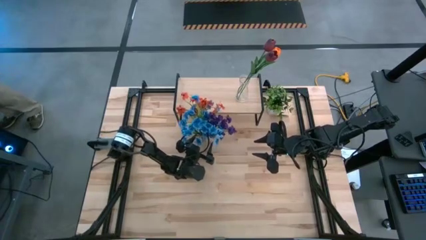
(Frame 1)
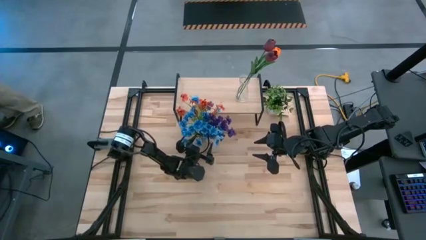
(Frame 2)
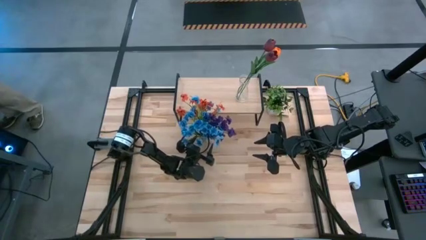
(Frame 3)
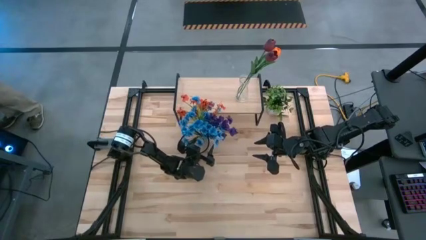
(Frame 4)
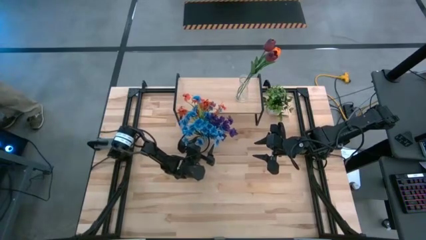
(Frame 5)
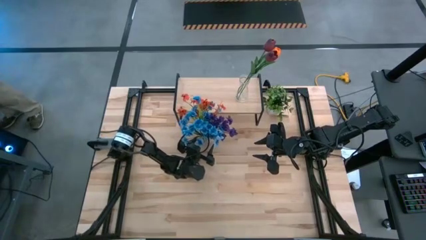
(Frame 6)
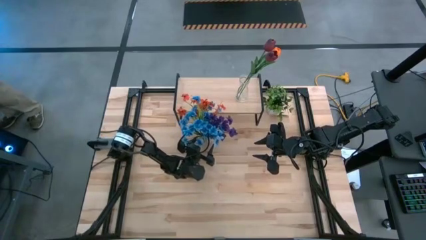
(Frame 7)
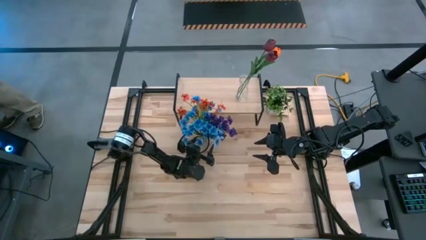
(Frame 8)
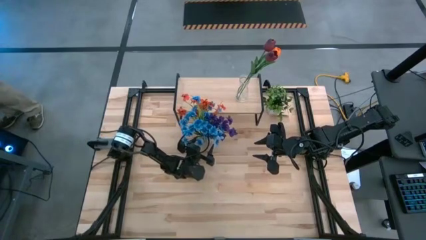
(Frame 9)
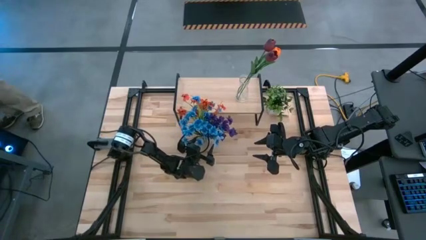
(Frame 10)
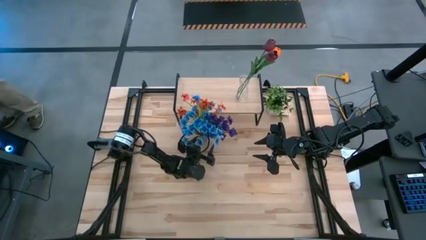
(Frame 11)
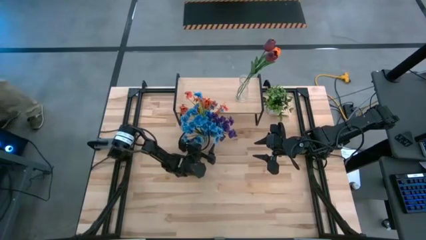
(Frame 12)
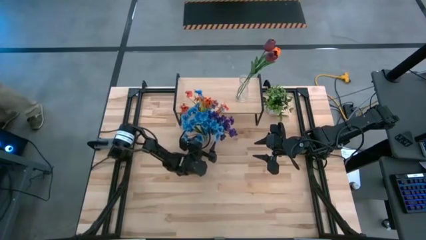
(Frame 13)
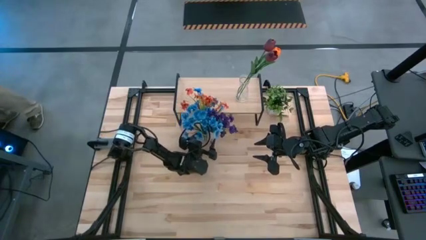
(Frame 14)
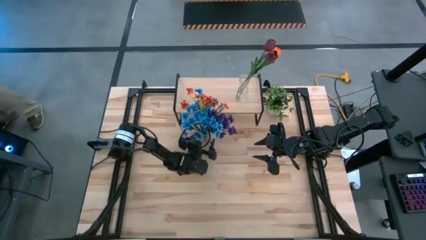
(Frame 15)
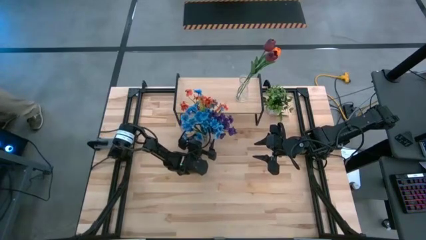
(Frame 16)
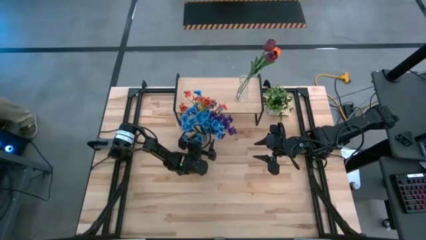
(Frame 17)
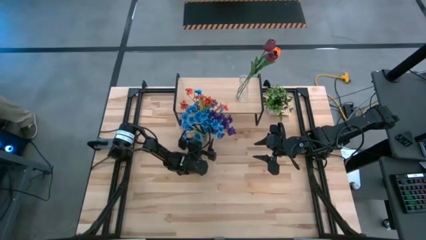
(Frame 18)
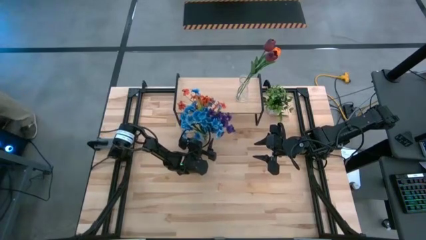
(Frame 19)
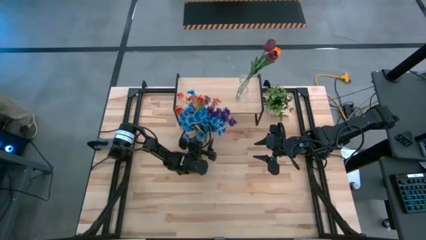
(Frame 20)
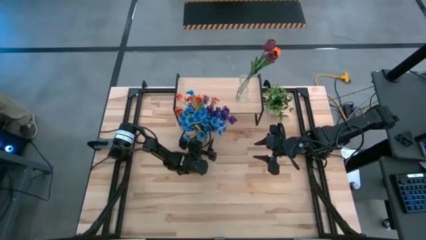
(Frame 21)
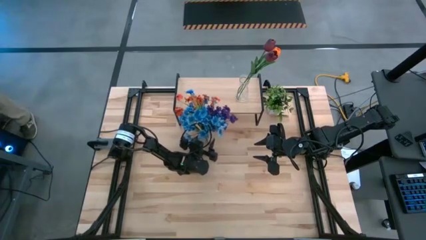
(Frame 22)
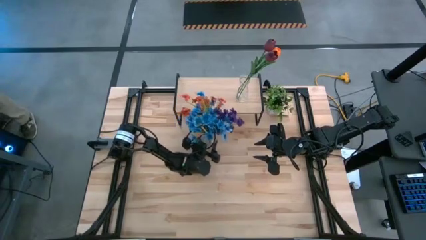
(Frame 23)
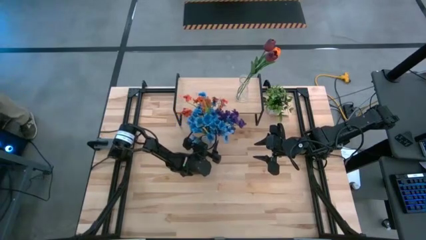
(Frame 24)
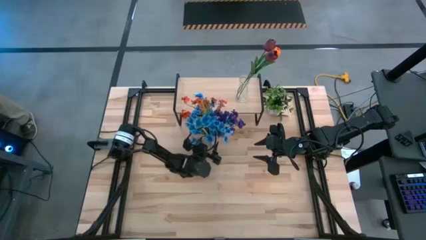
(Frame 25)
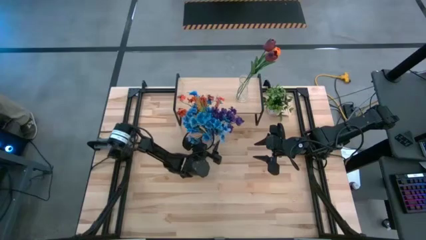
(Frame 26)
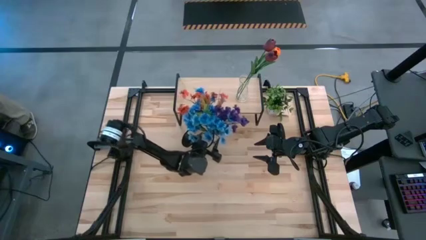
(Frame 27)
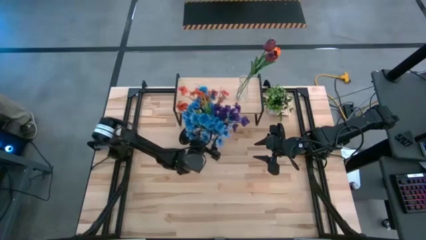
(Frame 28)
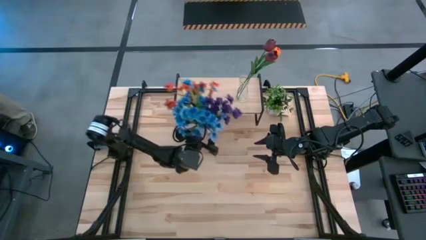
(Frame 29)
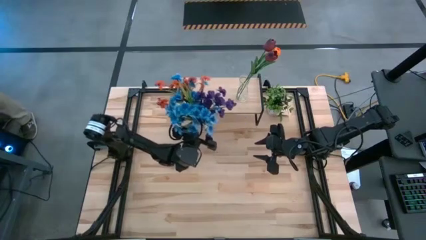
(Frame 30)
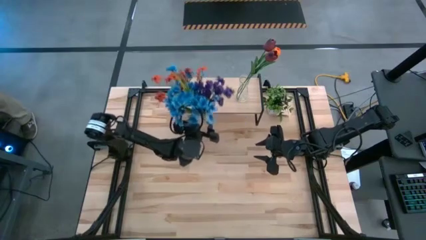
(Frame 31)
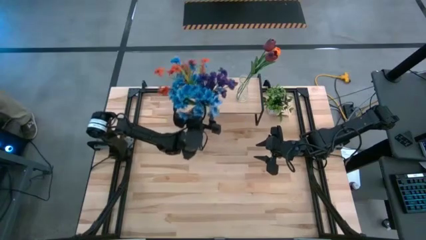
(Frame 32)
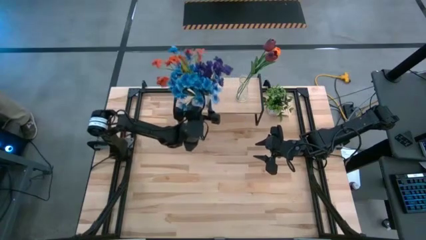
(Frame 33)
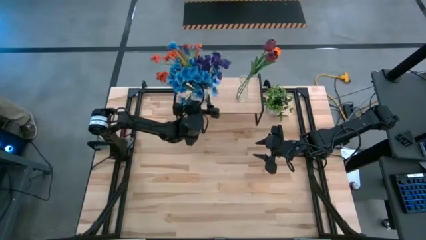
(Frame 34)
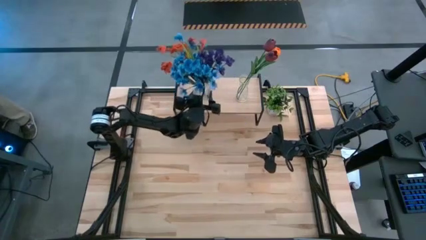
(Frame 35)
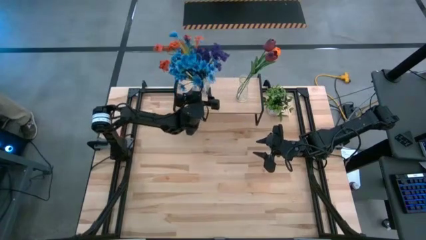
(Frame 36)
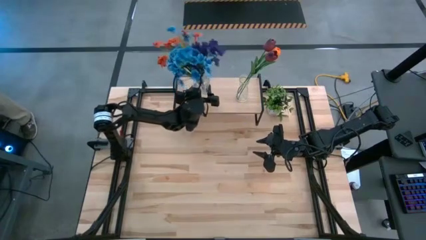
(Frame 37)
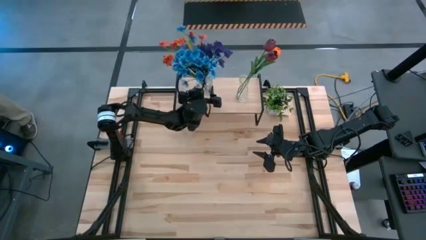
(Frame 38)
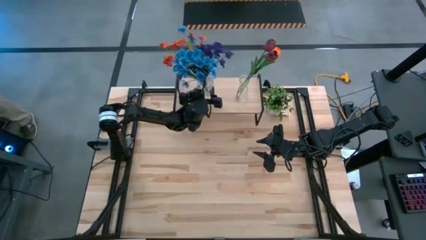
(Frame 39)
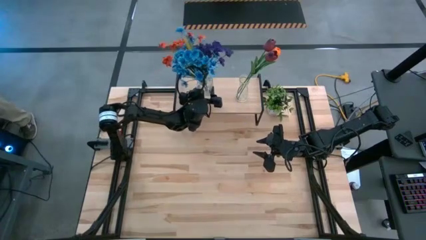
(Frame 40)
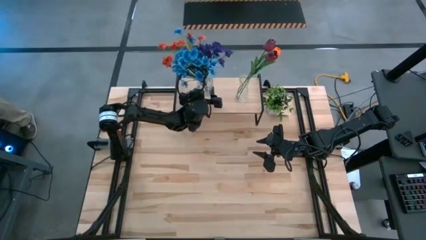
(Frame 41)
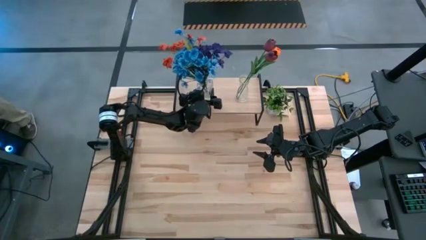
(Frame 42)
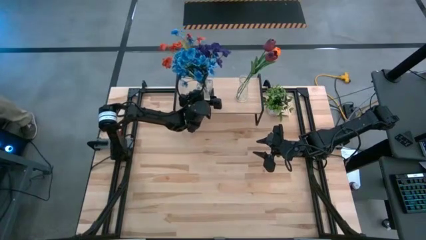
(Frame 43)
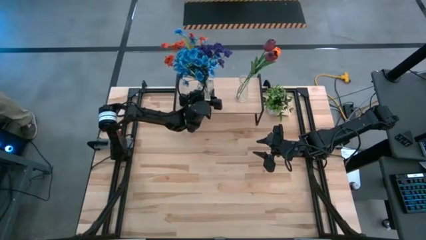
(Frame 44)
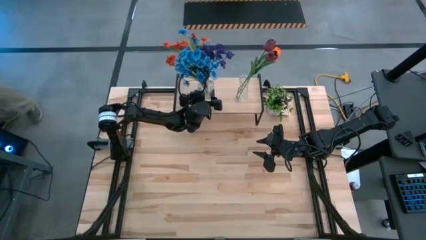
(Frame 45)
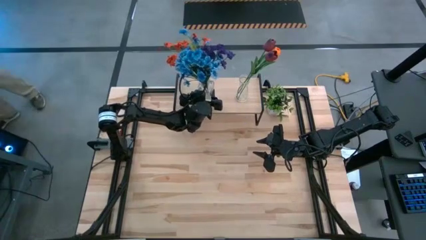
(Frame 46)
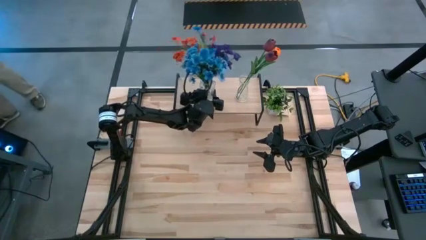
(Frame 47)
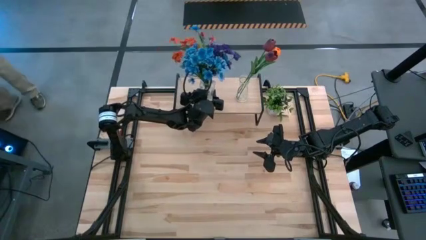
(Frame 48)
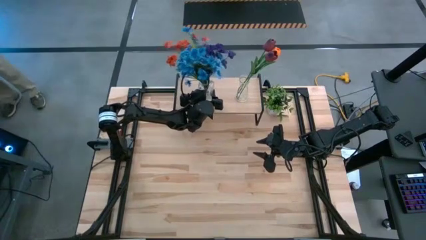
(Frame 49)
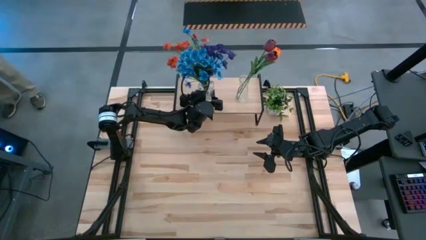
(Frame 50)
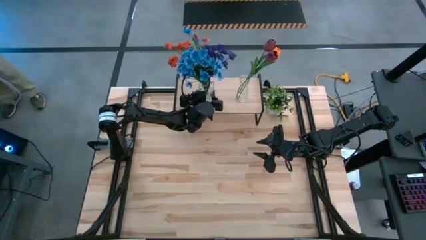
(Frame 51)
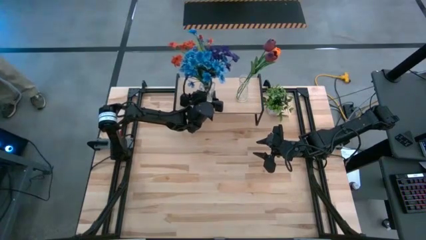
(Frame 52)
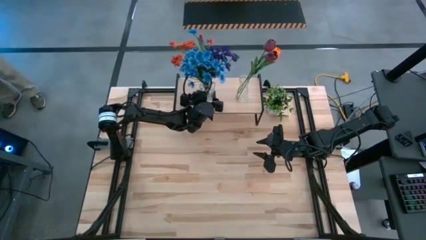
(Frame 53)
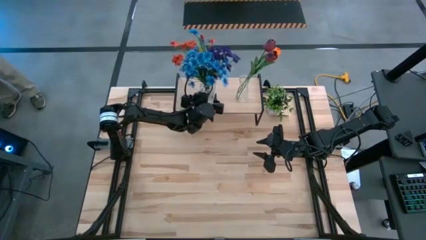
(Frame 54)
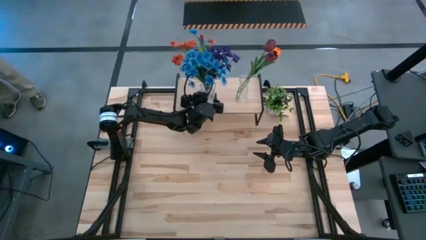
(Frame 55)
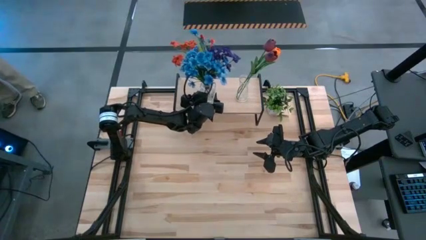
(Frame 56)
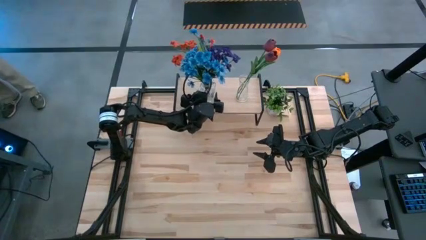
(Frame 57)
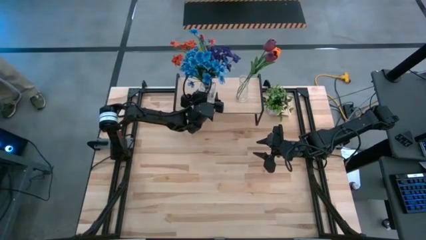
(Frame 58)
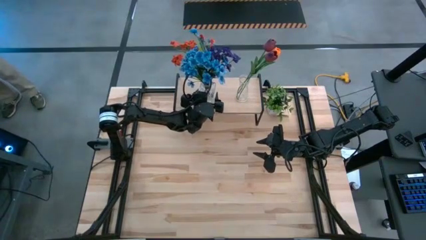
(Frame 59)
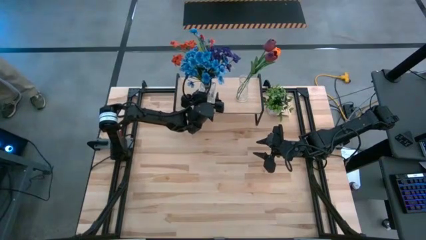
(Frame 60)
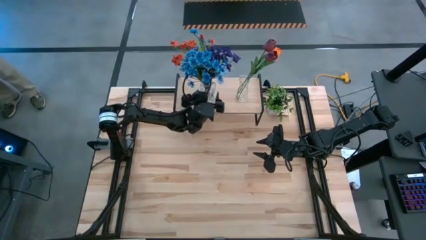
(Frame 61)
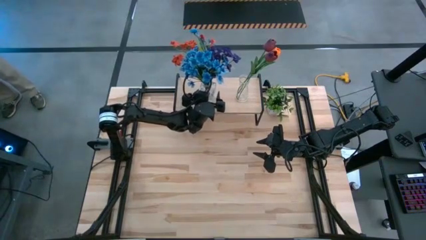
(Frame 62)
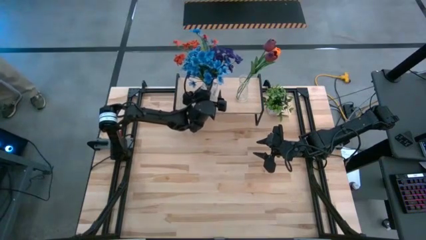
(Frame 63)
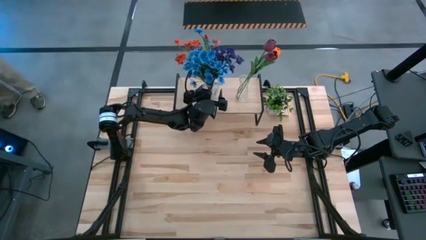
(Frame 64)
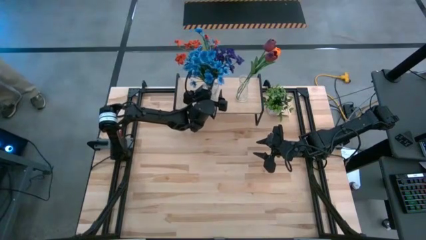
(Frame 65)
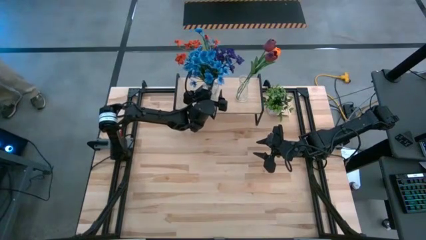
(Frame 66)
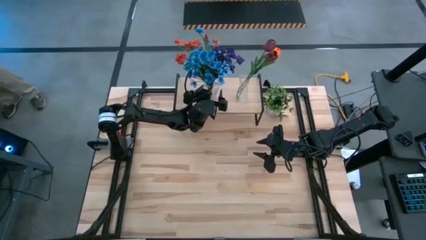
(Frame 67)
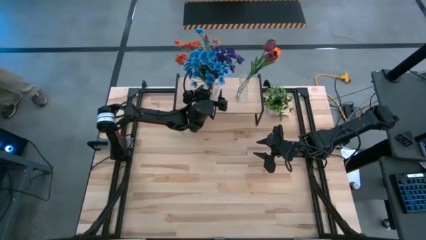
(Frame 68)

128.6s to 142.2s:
Task: Pick and place flowers into a vace then onto a shelf
Put the transparent vase with flowers on the shelf
